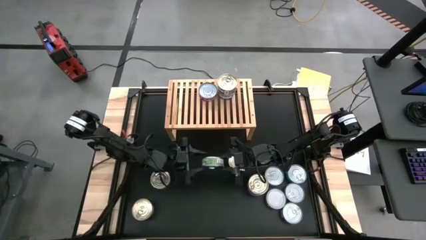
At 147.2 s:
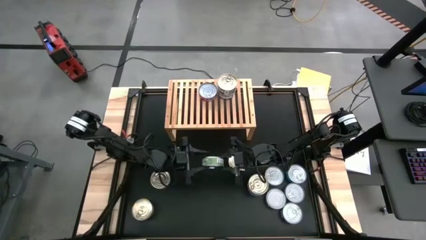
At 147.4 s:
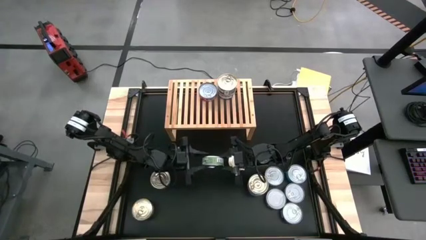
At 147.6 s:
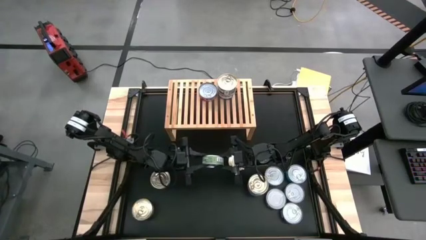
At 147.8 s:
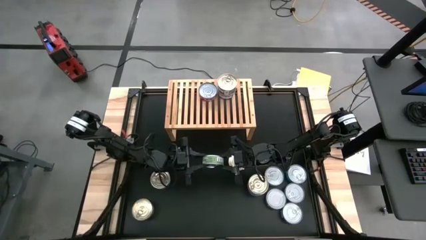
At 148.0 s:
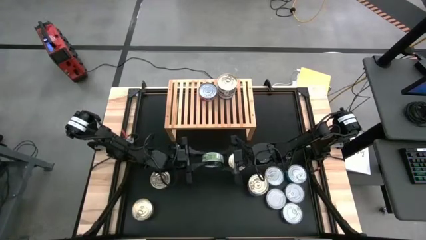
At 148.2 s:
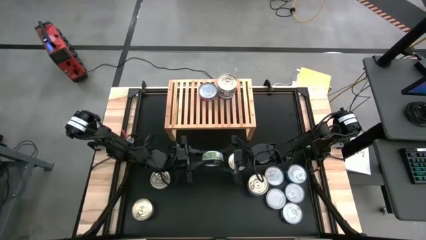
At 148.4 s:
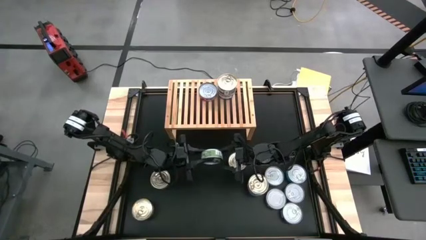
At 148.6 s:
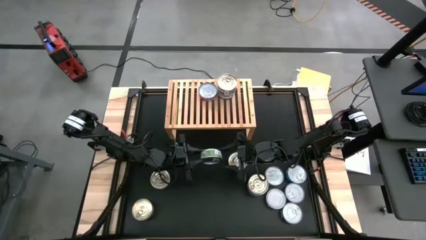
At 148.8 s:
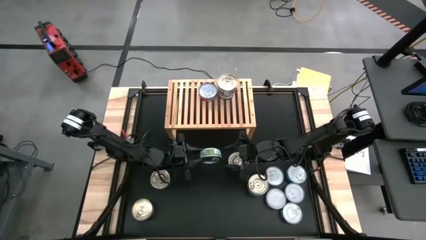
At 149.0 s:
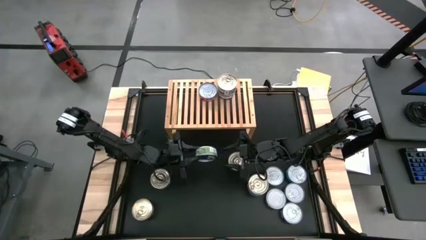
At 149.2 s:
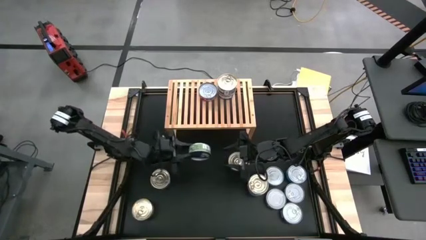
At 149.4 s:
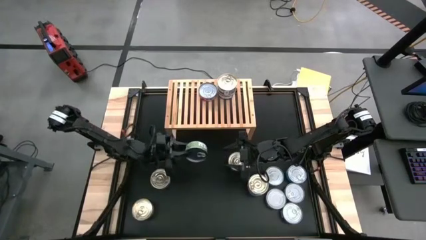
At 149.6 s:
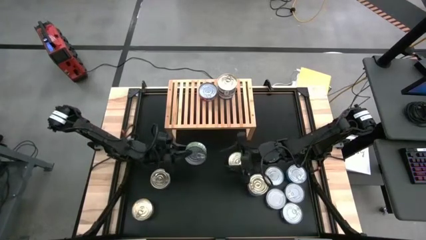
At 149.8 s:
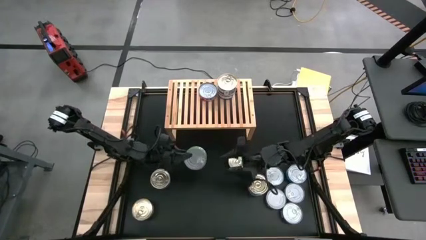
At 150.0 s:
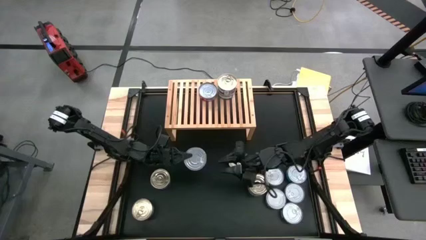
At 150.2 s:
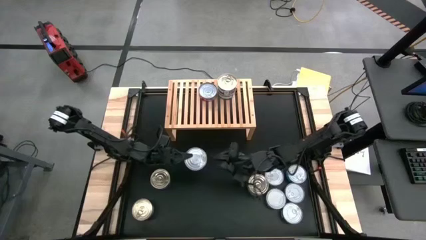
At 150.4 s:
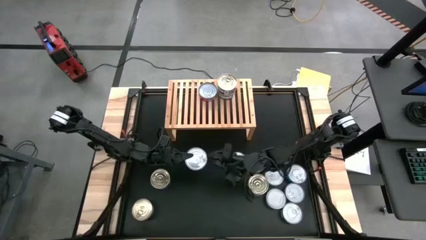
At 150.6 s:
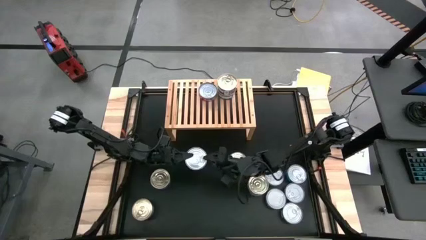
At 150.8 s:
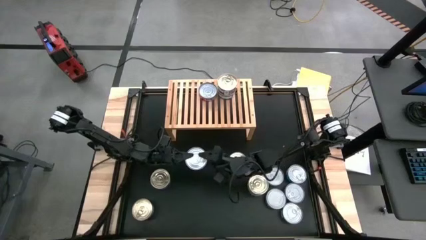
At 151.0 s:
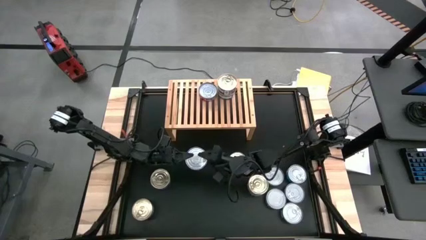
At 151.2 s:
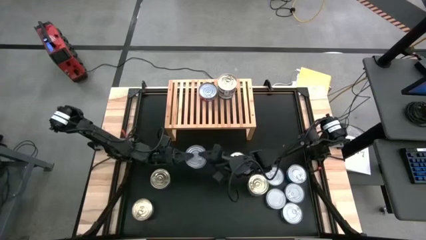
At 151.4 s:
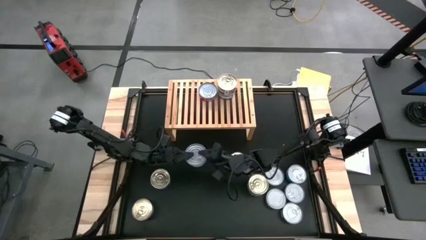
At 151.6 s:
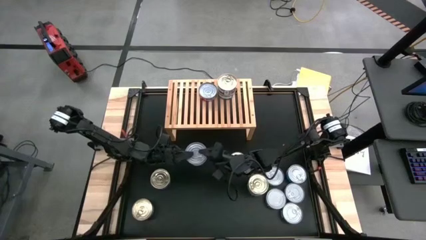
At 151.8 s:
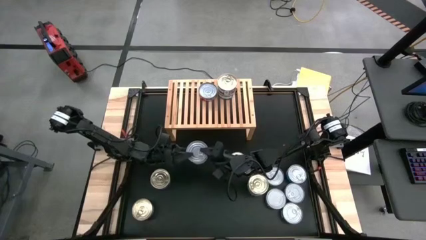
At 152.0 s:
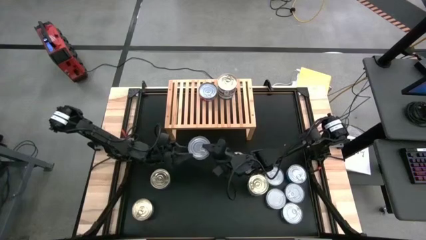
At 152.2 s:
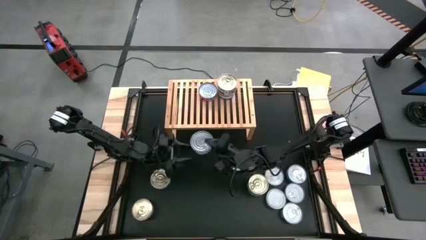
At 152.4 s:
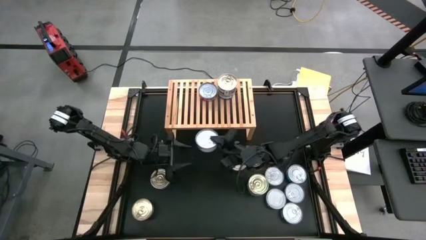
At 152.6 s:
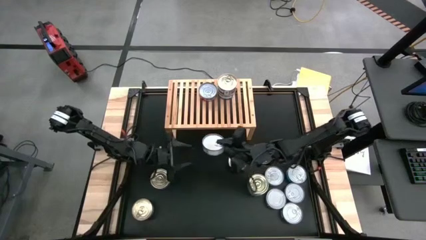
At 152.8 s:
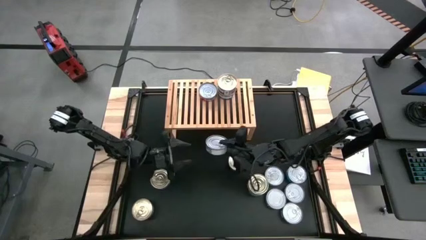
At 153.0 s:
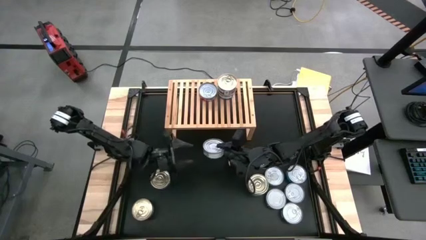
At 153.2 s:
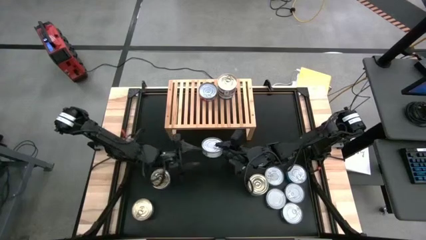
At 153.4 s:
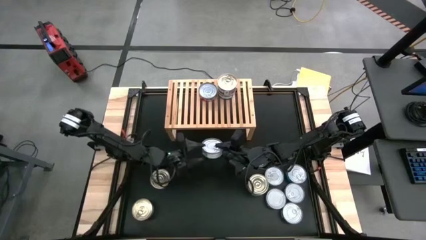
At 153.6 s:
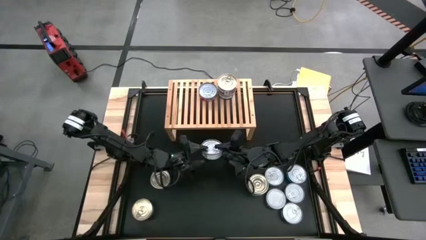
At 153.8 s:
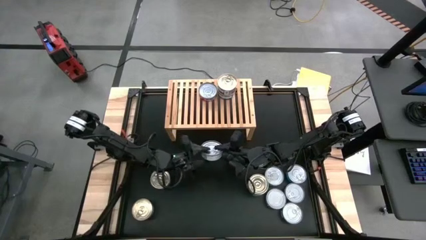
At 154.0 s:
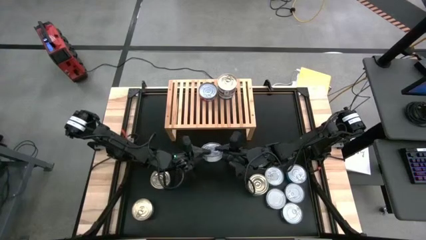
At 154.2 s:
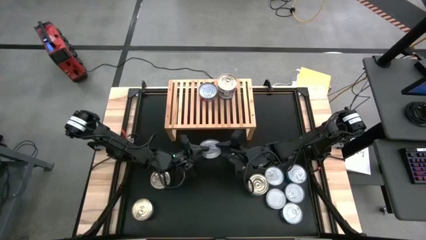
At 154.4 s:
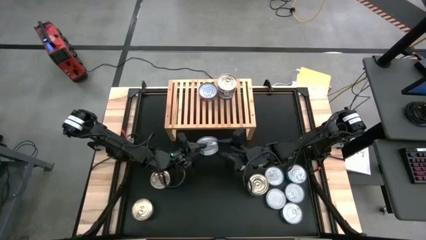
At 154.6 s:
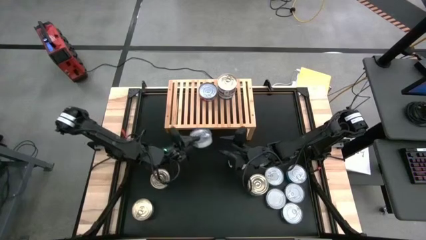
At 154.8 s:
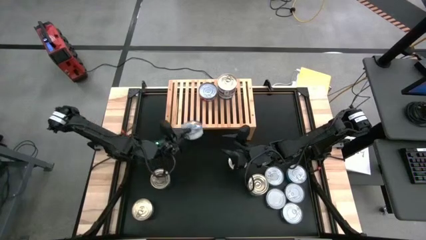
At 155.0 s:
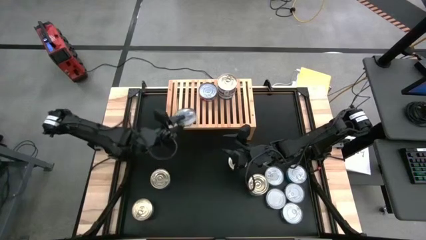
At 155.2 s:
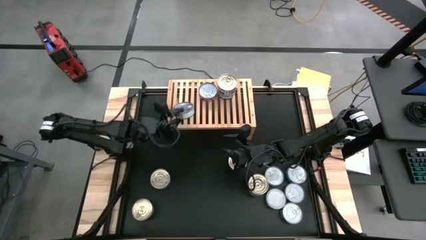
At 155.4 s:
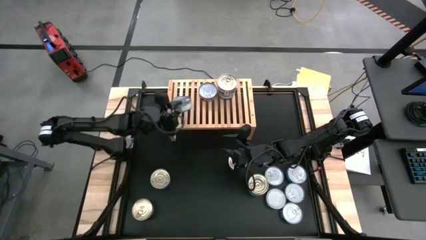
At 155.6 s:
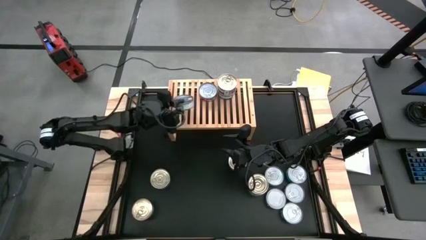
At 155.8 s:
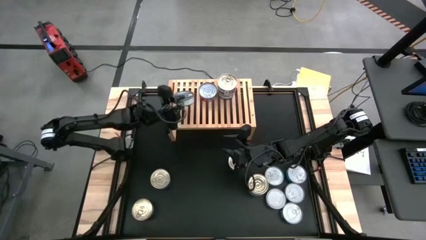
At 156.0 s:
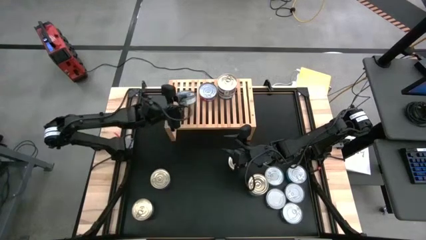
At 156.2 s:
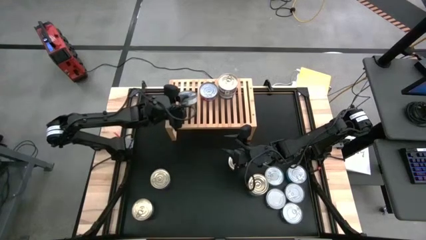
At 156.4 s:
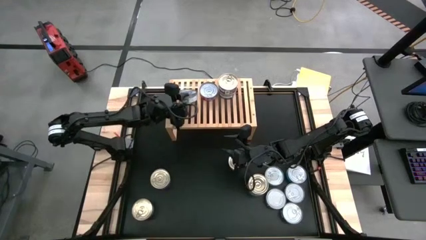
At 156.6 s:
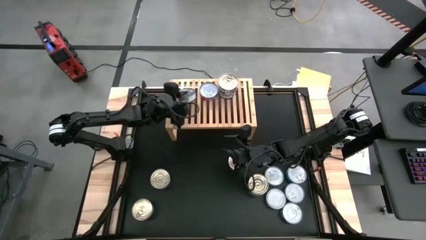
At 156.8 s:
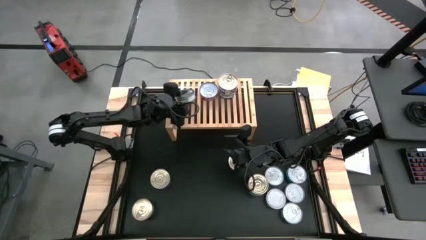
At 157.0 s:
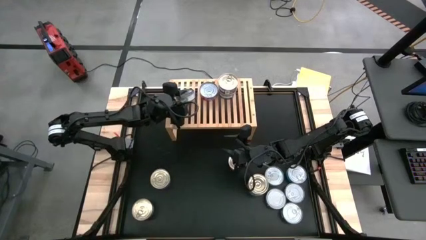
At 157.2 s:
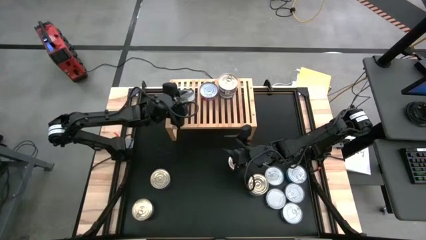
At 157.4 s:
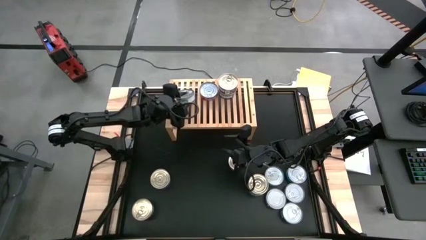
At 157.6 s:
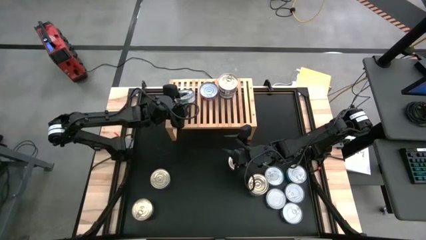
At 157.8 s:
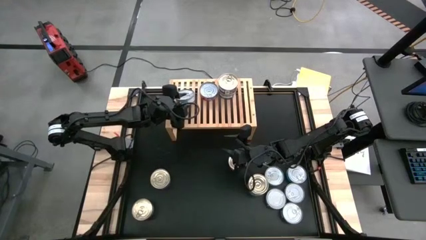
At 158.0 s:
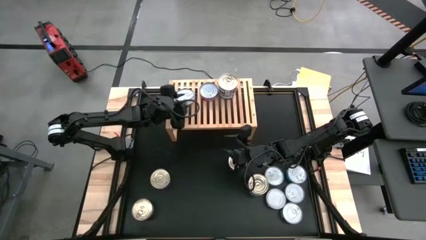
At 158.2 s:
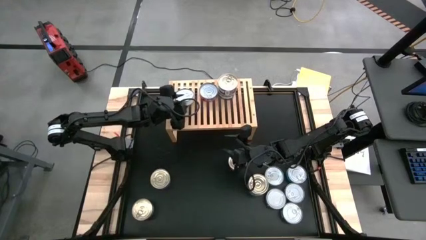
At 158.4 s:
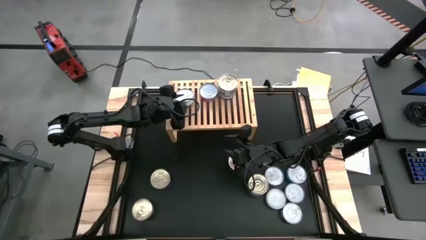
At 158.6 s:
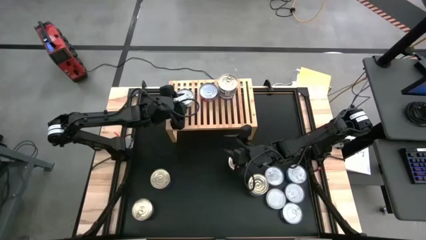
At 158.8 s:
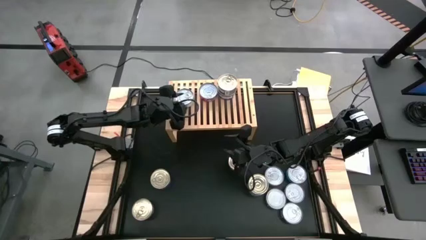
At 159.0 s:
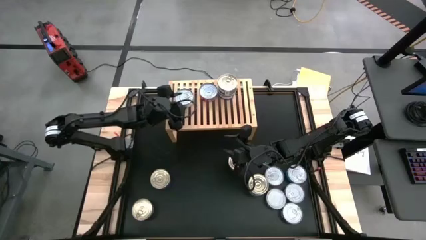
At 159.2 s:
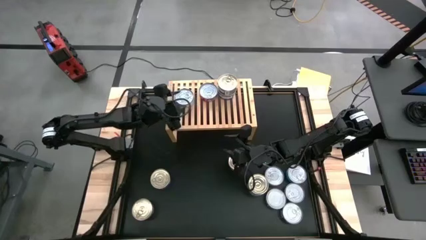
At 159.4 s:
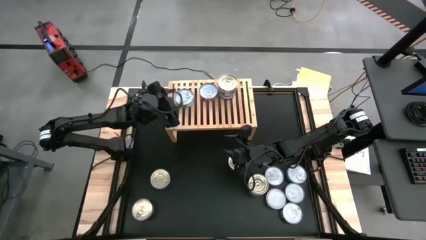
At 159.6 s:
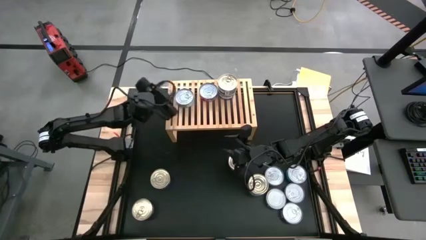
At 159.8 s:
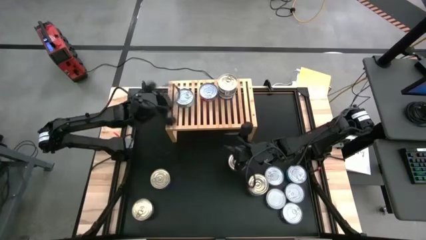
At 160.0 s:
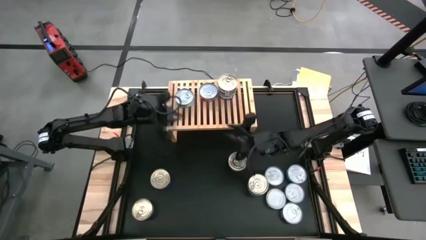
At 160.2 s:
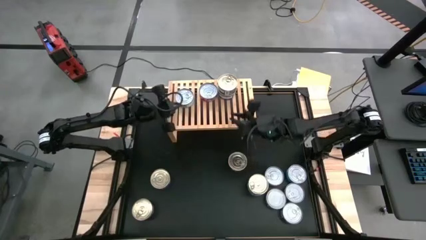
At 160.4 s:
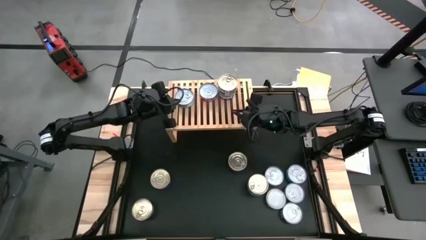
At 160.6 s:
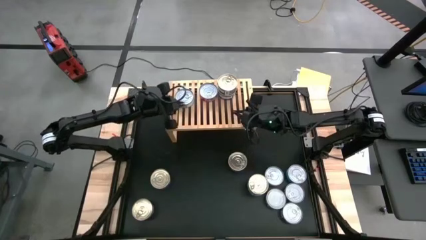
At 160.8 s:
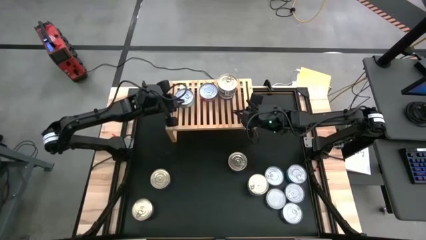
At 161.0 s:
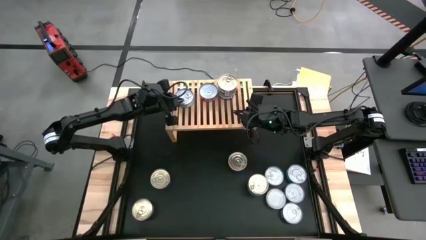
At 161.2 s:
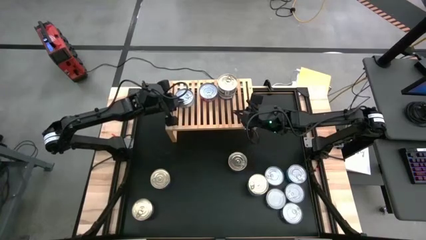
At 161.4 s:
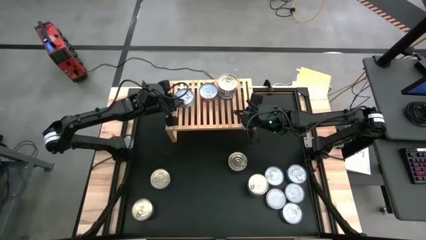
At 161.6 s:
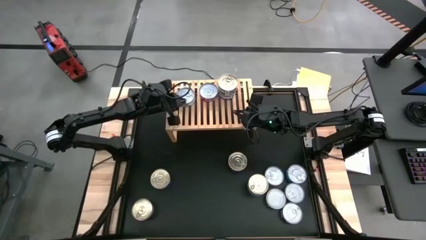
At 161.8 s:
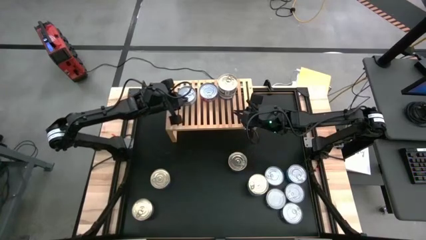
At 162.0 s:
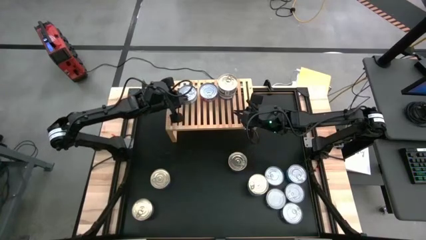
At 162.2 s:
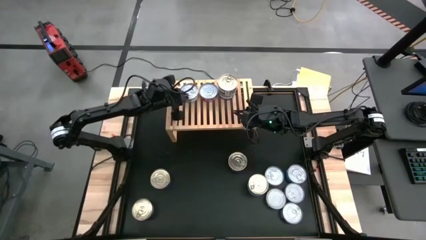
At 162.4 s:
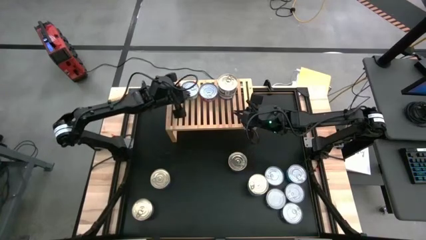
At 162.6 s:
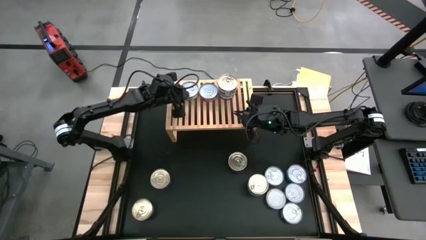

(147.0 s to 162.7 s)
Task: Stack canned seafood by type on shelf
Put the green tuna can on the shelf
